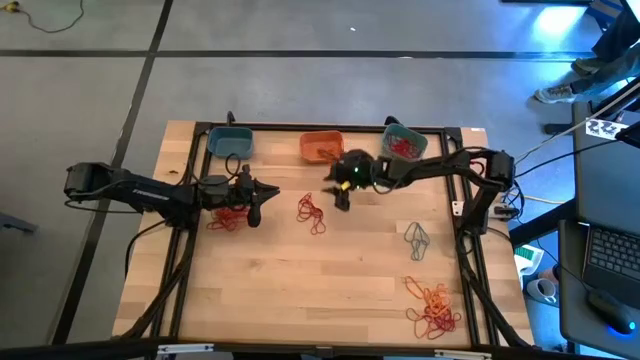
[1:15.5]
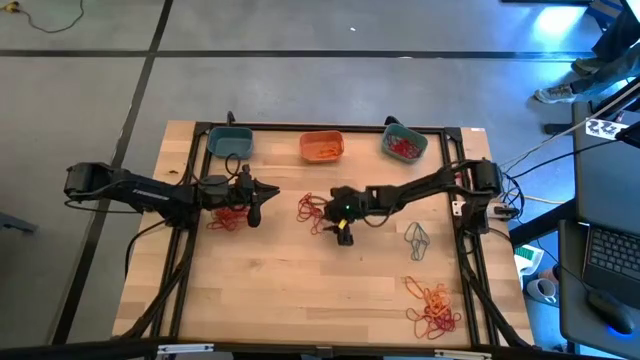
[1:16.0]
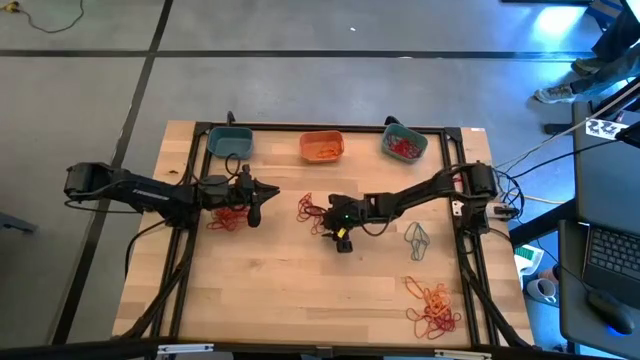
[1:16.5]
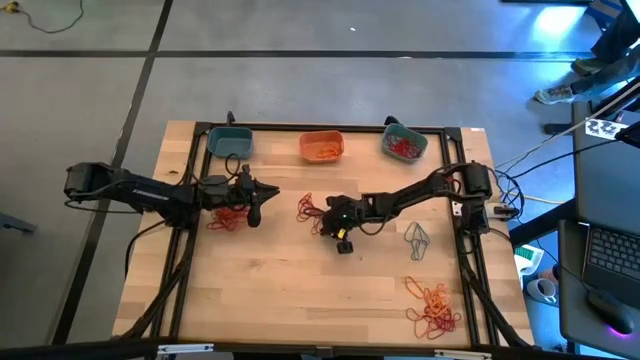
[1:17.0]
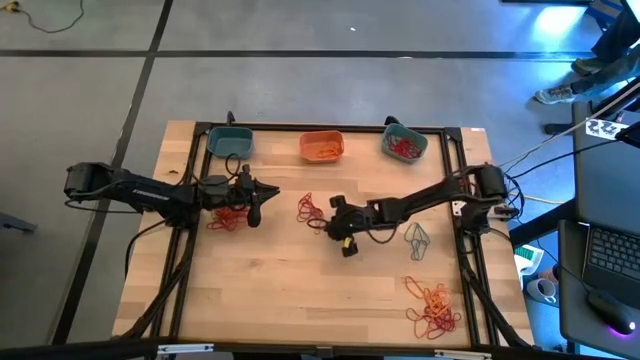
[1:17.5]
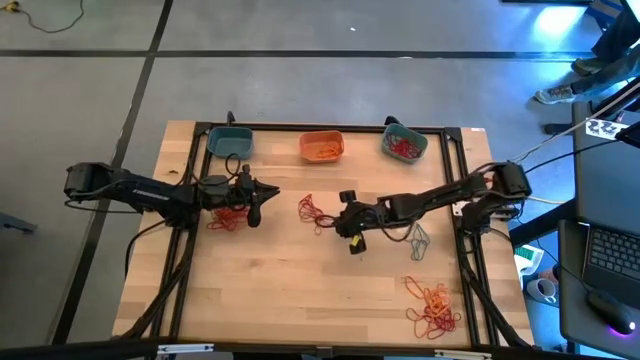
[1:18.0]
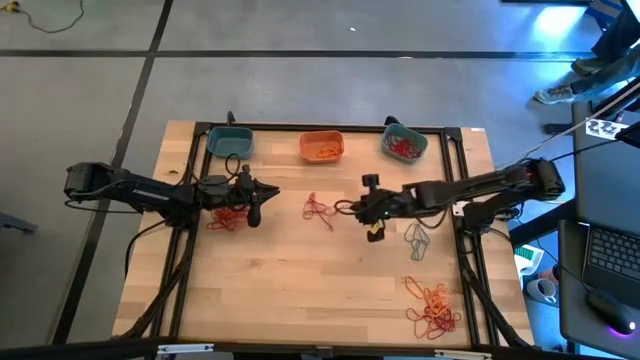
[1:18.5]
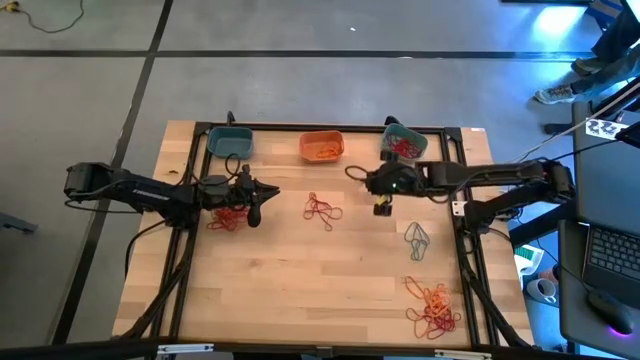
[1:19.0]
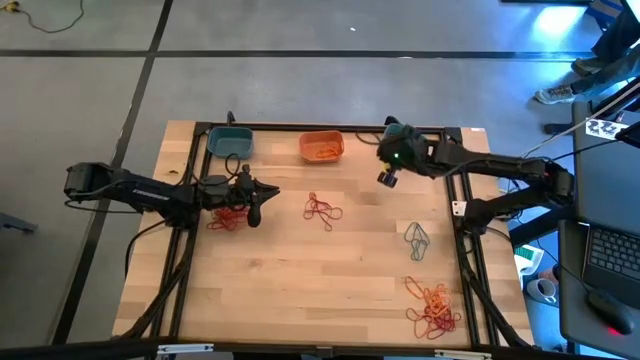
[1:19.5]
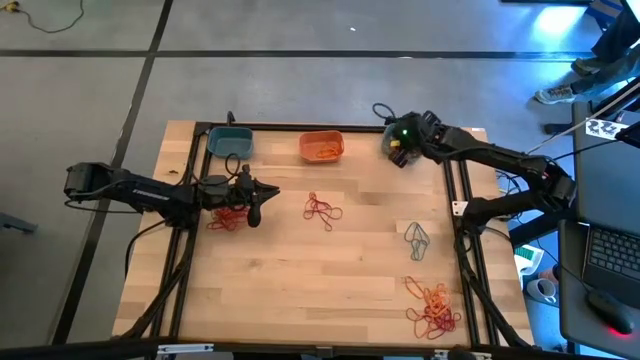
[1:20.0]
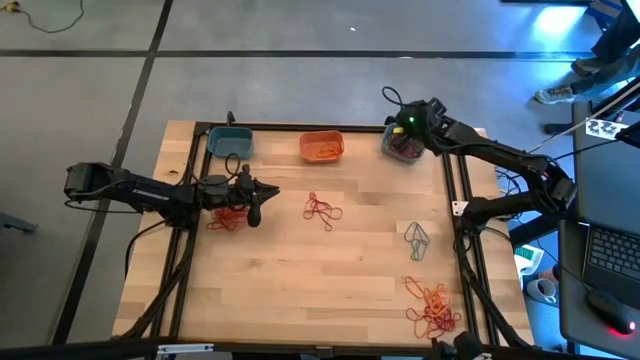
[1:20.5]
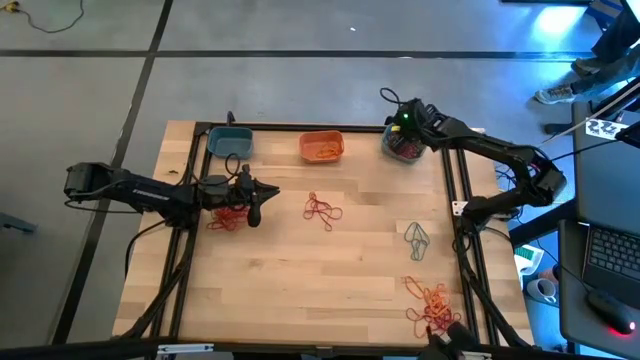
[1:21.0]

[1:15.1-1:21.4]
Task: Sort rubber bands into baskets
Put the red rubber band into the green bin

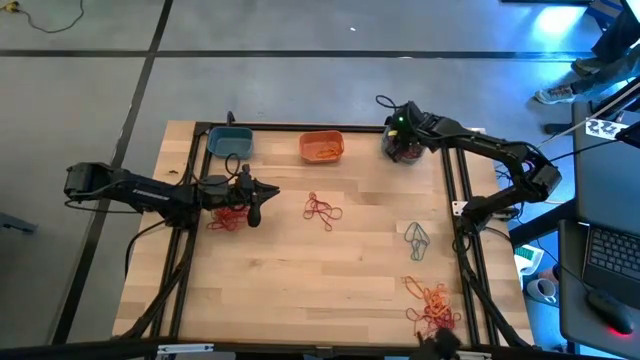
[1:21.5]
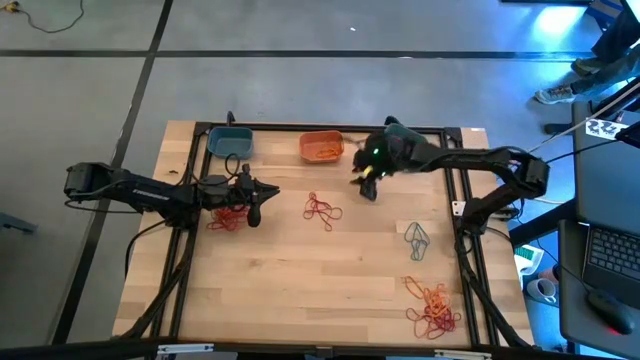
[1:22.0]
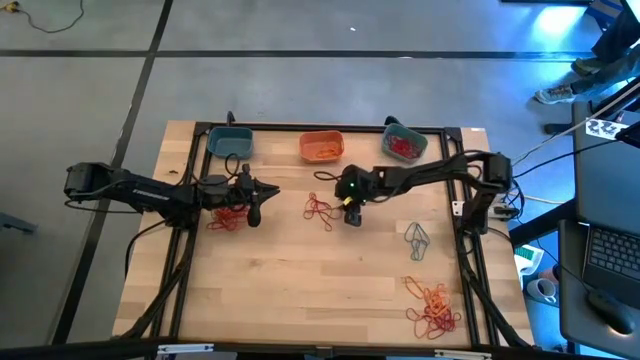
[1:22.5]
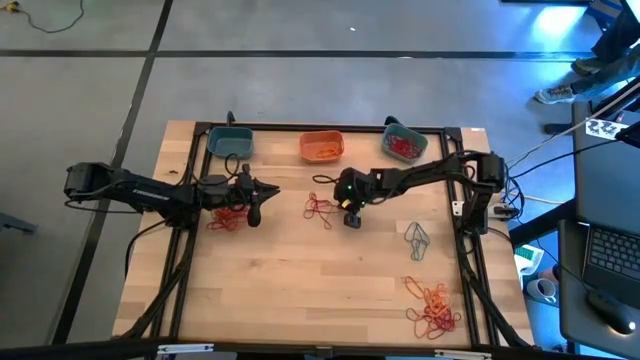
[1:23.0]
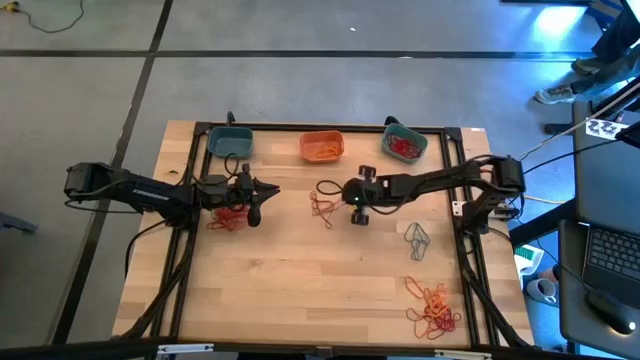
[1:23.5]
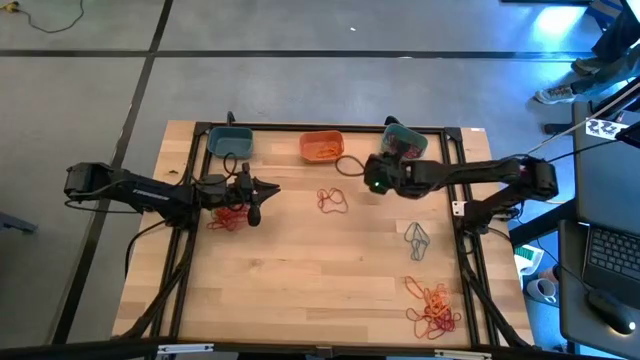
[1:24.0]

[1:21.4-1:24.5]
Put the red rubber band into the green bin

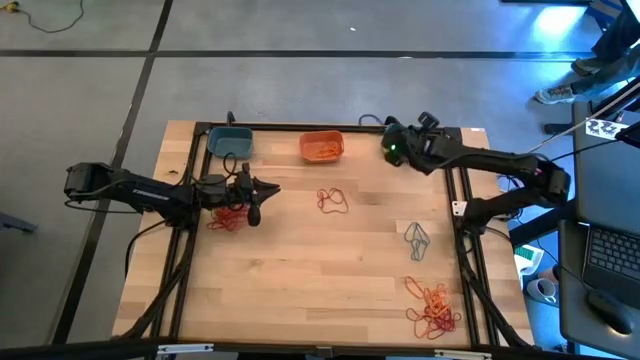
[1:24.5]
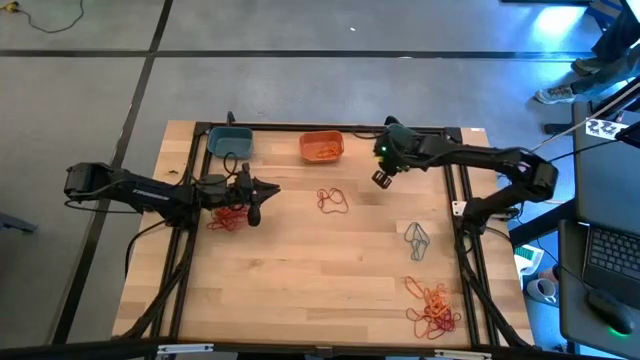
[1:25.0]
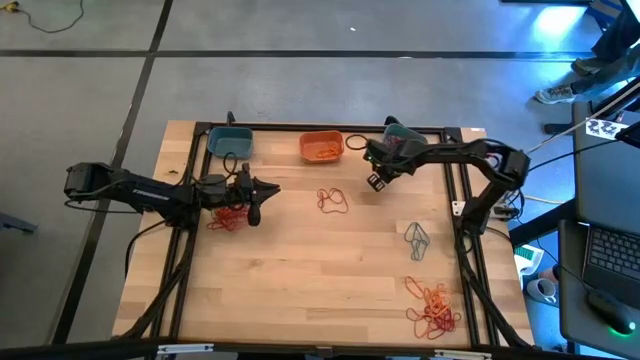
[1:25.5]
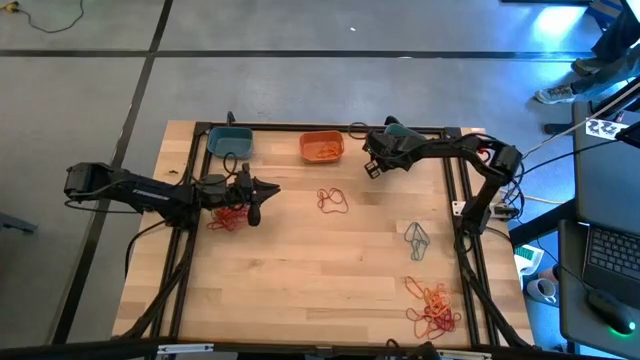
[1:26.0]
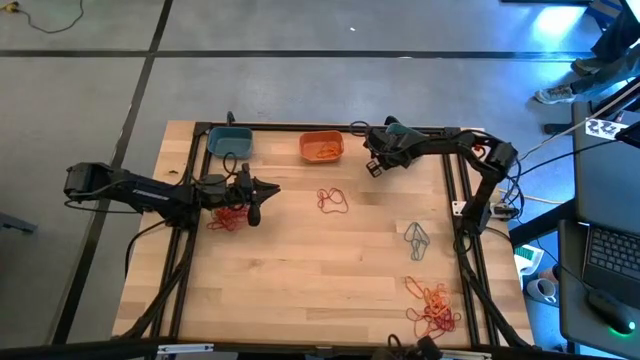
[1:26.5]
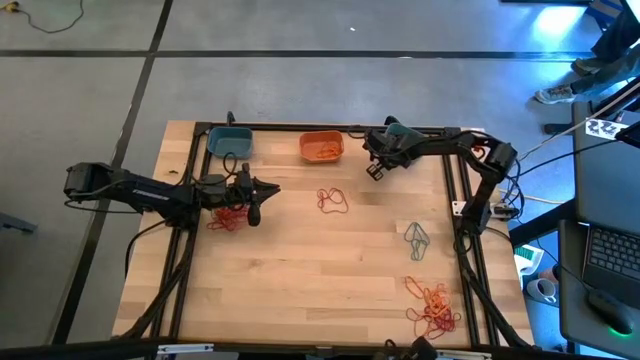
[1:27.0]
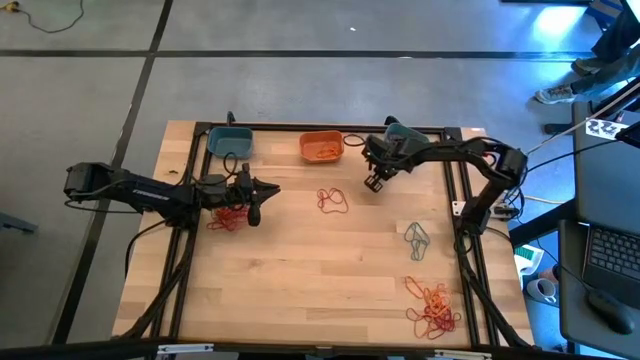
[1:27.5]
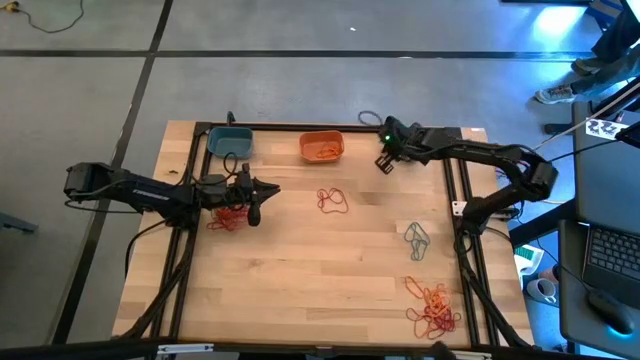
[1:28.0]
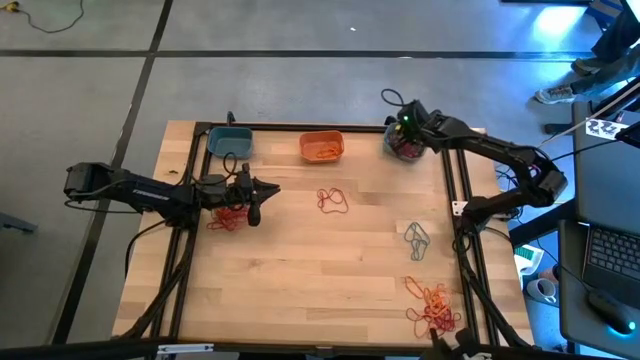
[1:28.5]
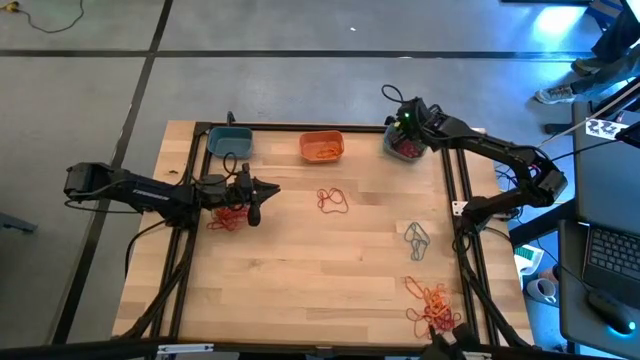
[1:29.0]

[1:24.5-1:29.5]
Put the red rubber band into the green bin

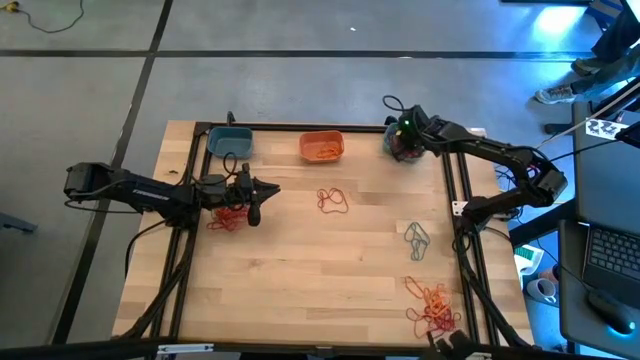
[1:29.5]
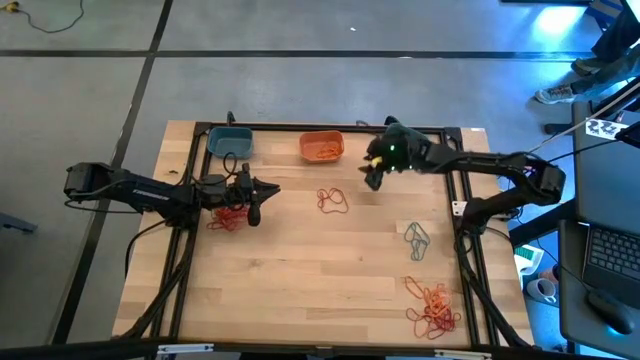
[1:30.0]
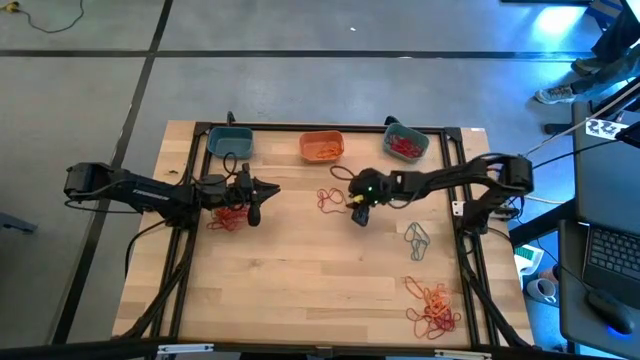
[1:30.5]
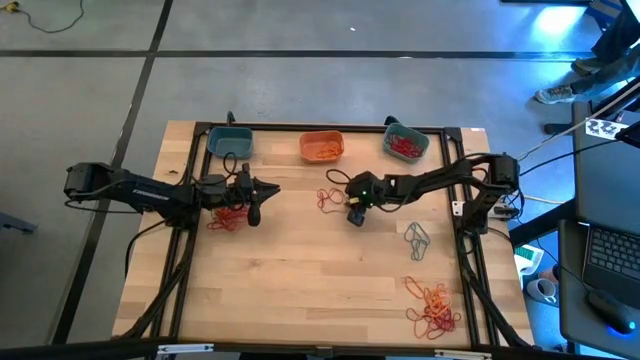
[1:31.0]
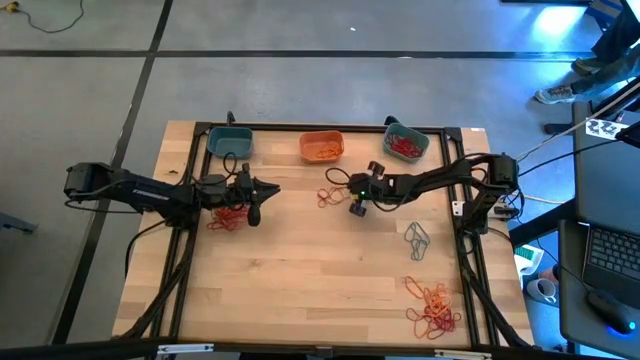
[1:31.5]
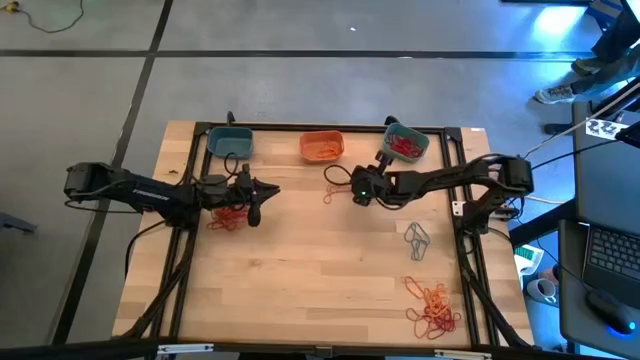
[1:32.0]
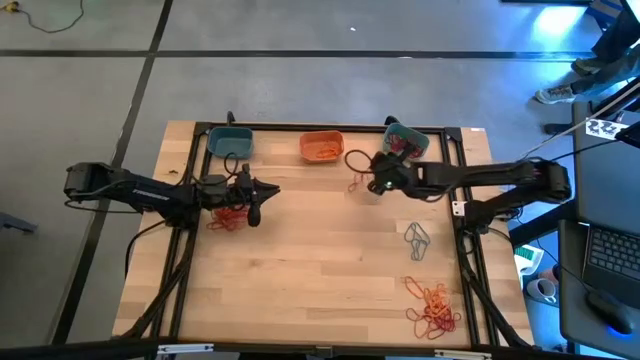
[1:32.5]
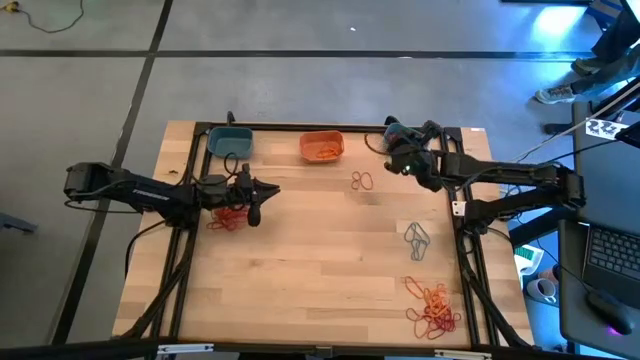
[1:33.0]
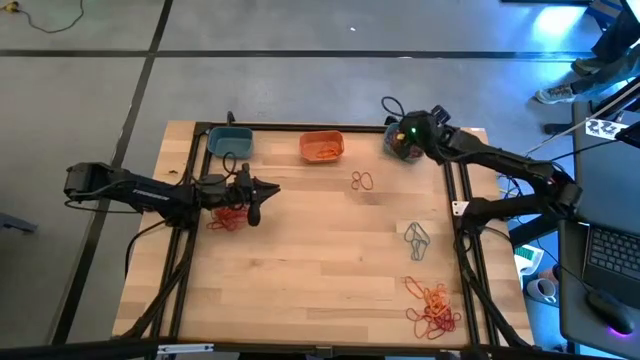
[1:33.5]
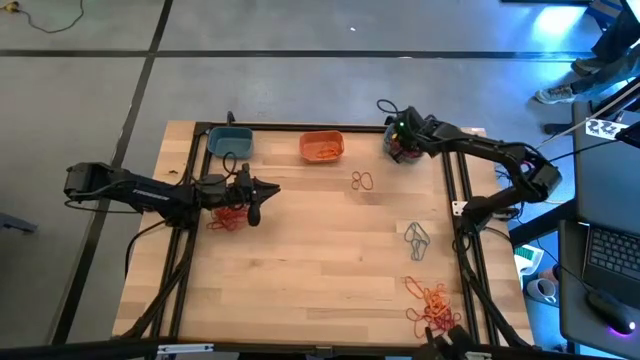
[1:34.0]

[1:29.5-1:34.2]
Put the red rubber band into the green bin

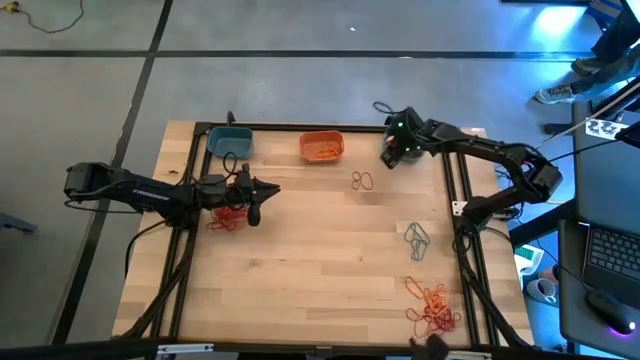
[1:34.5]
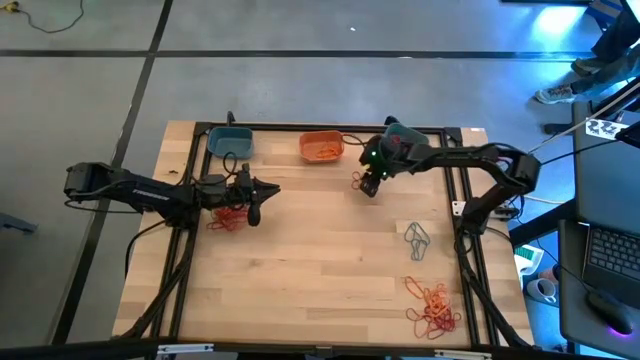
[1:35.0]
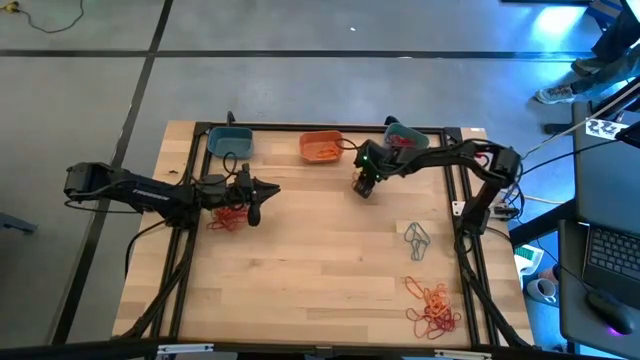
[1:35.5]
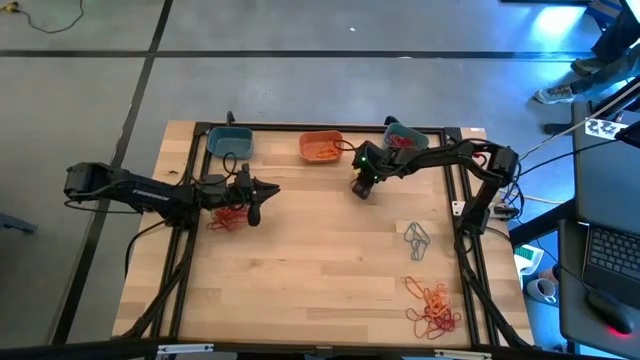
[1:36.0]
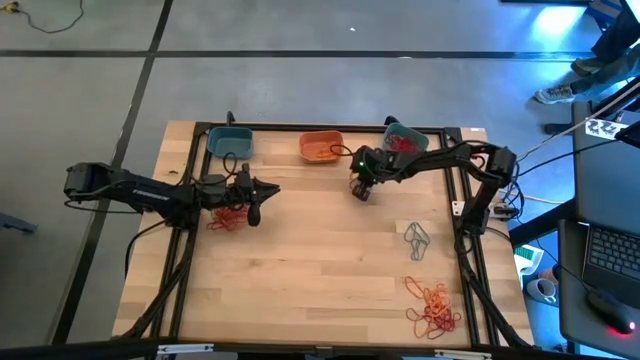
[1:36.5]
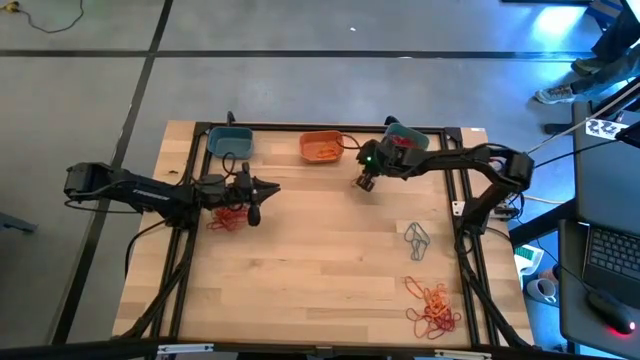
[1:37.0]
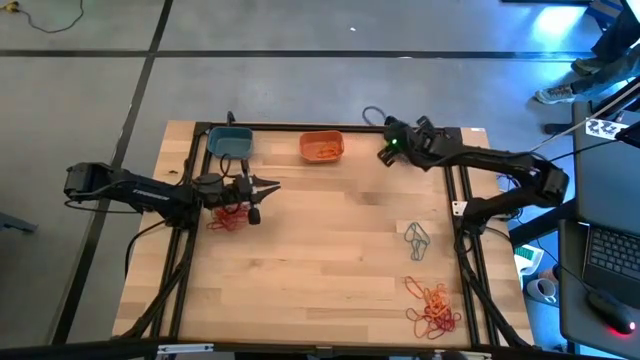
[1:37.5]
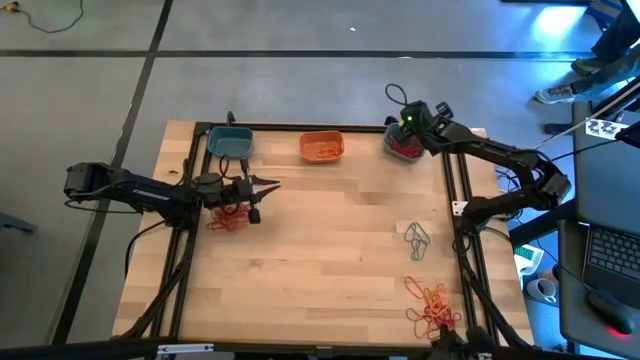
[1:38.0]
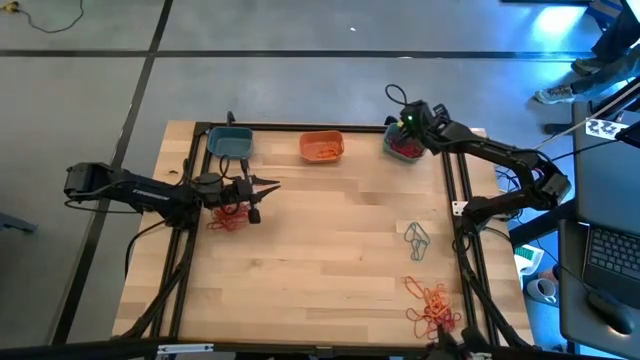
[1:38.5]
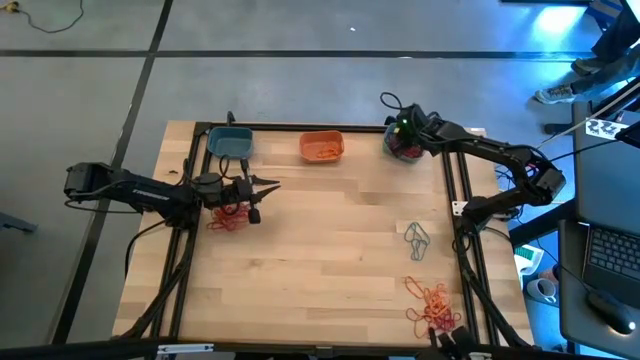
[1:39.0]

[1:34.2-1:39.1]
Put the red rubber band into the green bin
